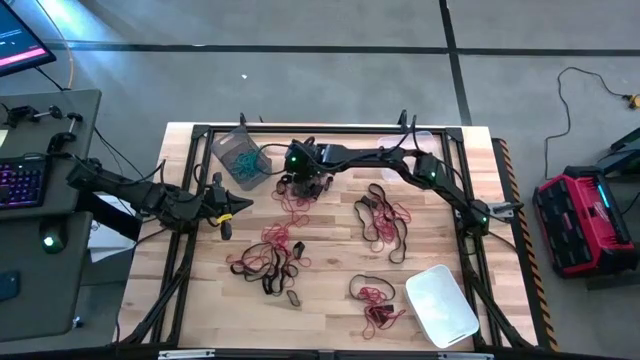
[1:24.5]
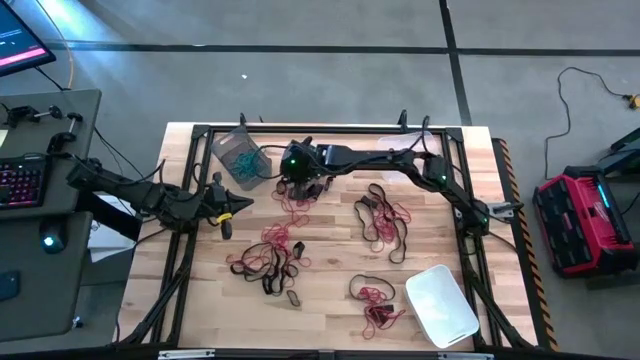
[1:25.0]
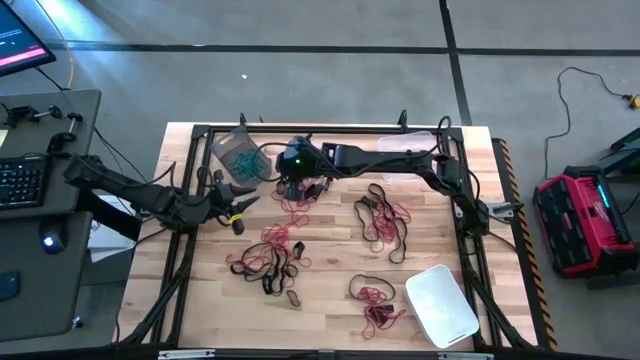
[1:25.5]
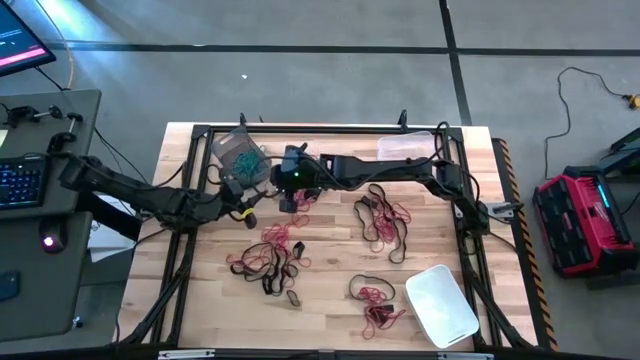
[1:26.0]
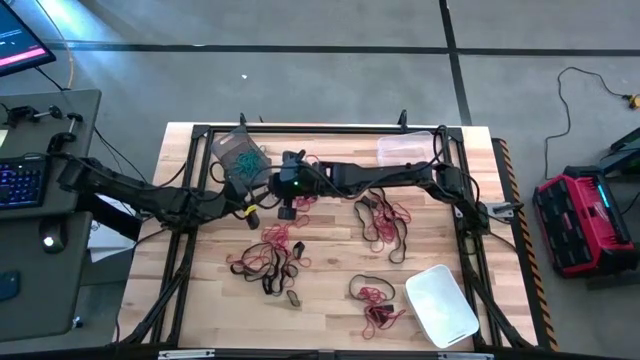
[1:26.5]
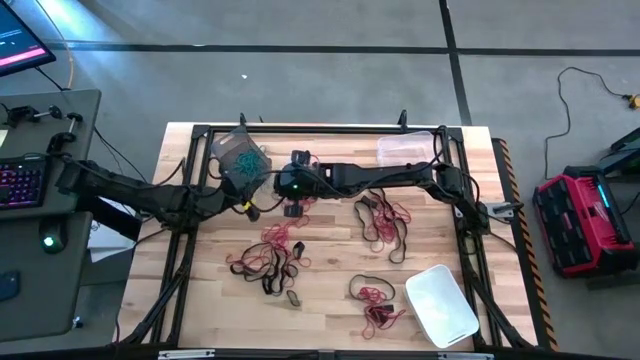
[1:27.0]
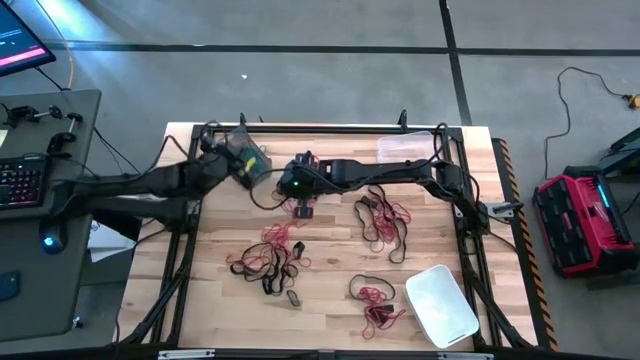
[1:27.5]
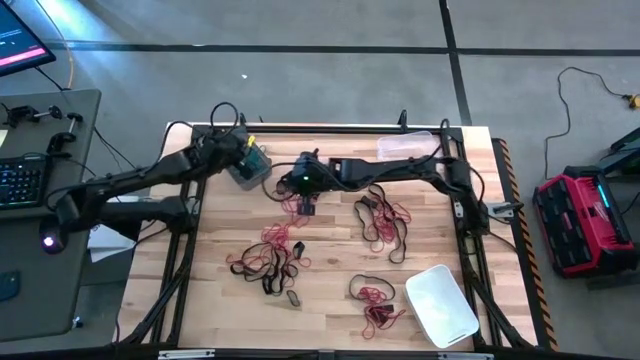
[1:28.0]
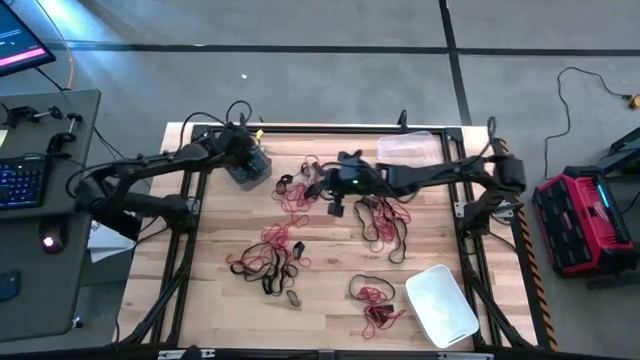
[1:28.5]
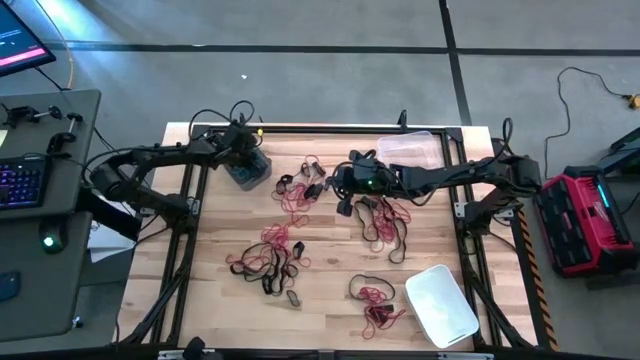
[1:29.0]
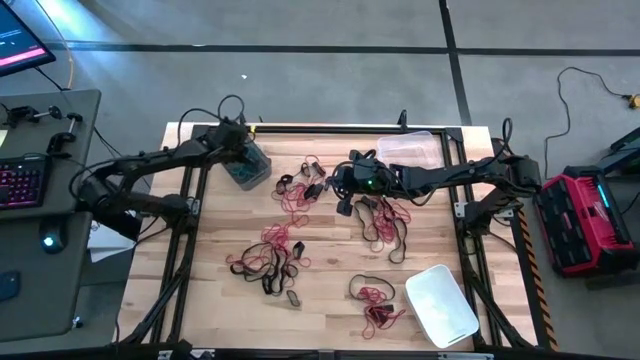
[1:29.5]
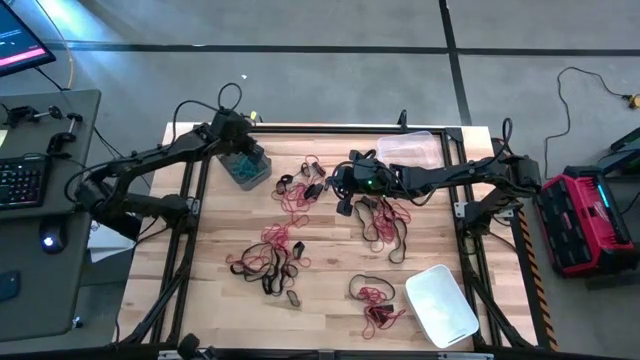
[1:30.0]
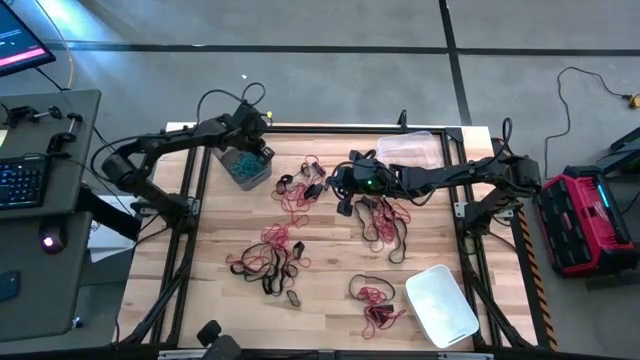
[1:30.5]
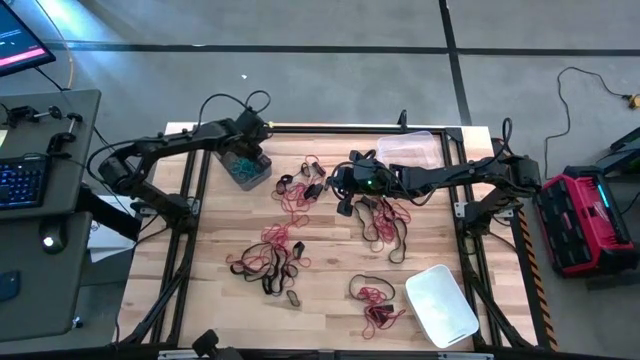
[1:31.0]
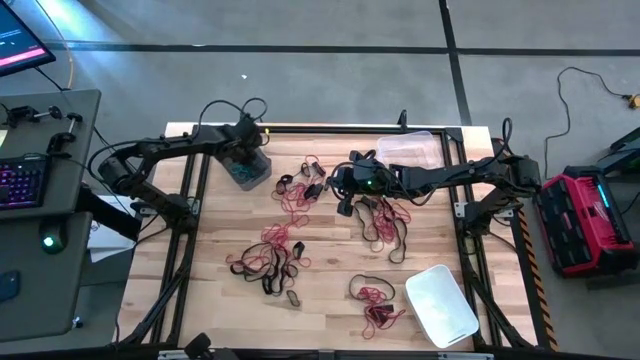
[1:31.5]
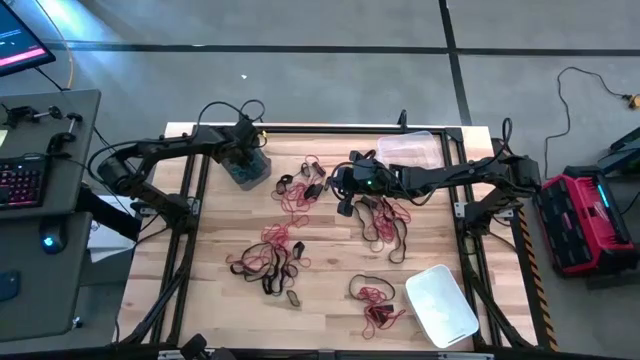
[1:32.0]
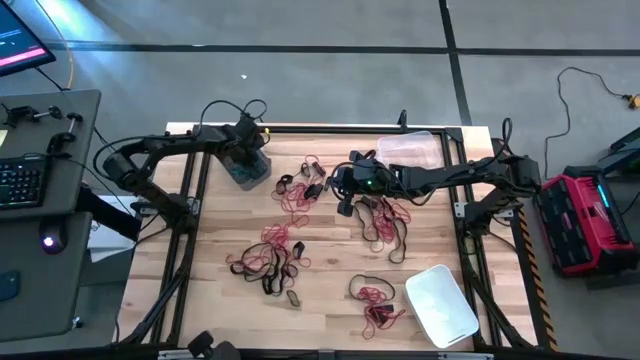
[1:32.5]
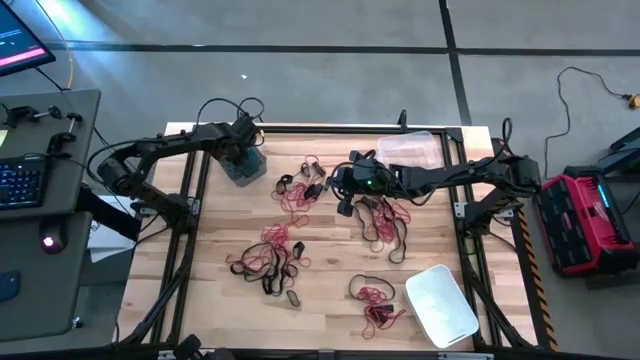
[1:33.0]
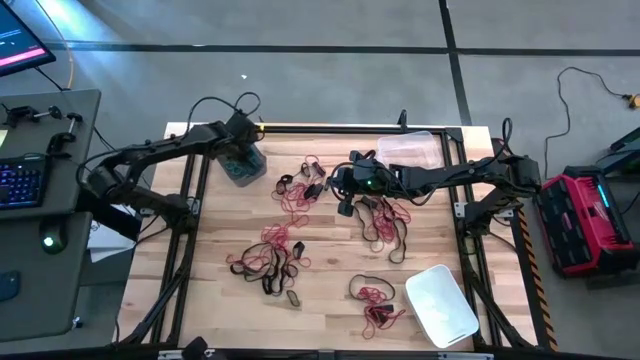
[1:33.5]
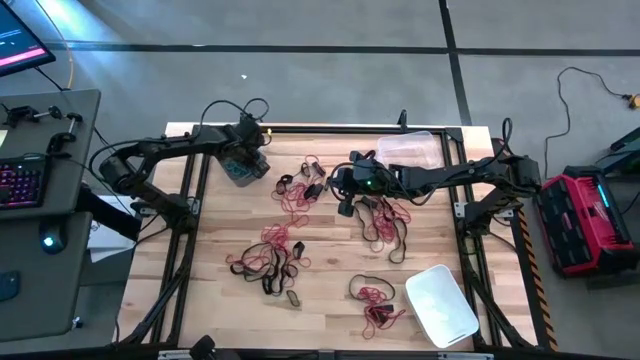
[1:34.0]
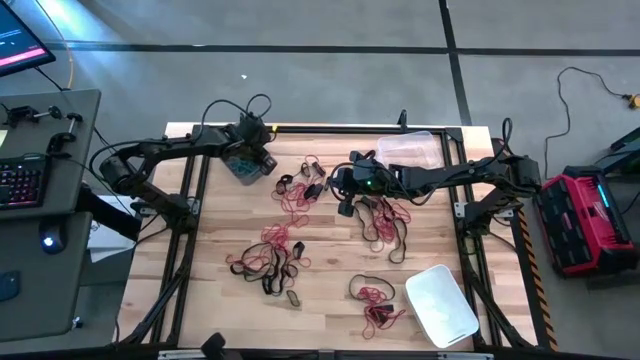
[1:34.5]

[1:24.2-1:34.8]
Task: Sort rubber bands into baskets
Put the blue rubber band into the black bin

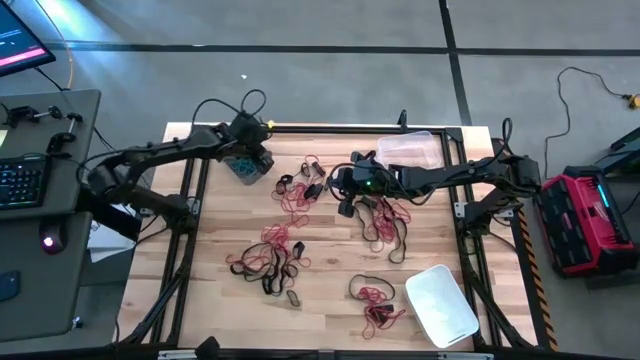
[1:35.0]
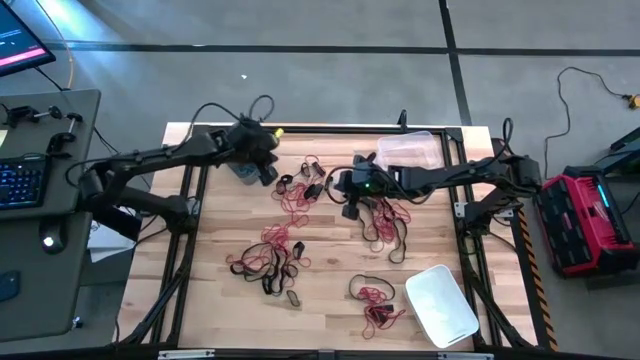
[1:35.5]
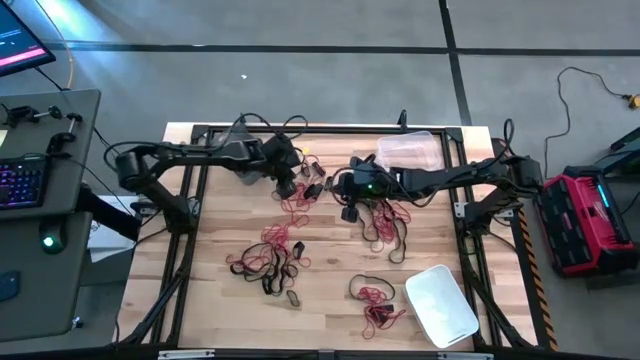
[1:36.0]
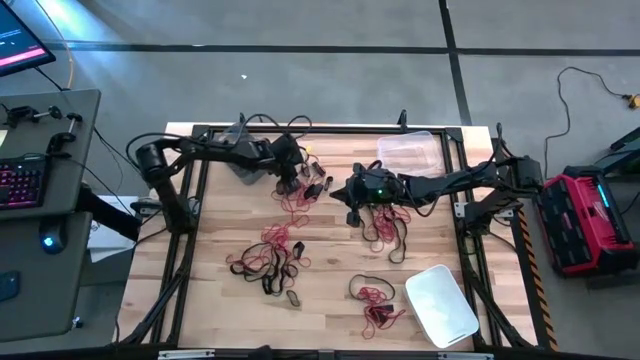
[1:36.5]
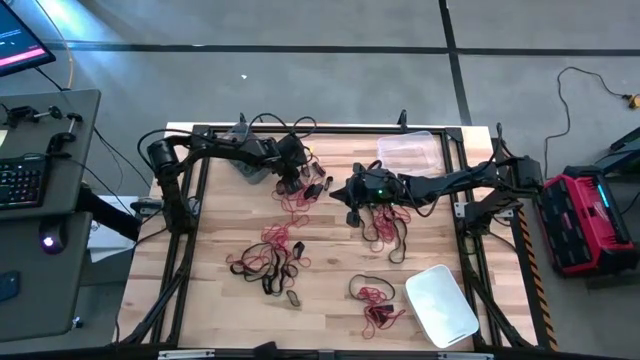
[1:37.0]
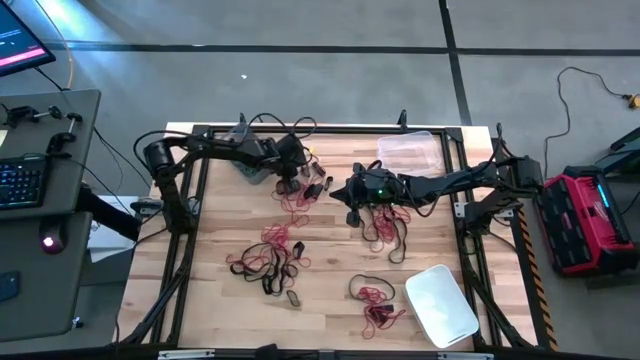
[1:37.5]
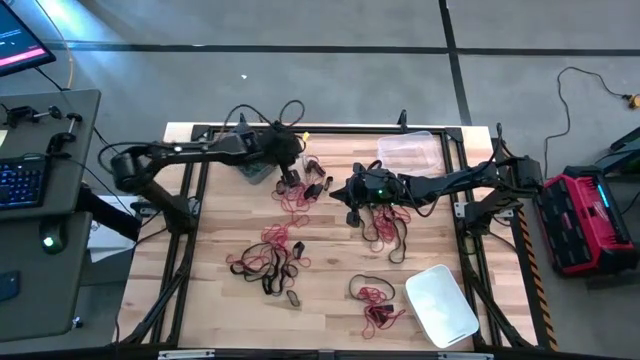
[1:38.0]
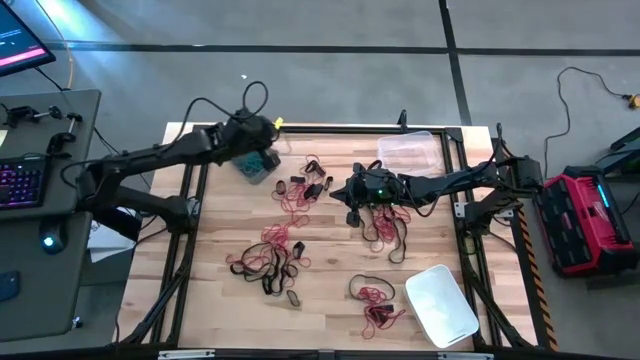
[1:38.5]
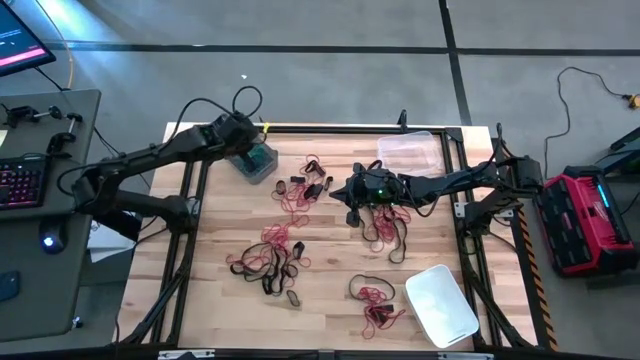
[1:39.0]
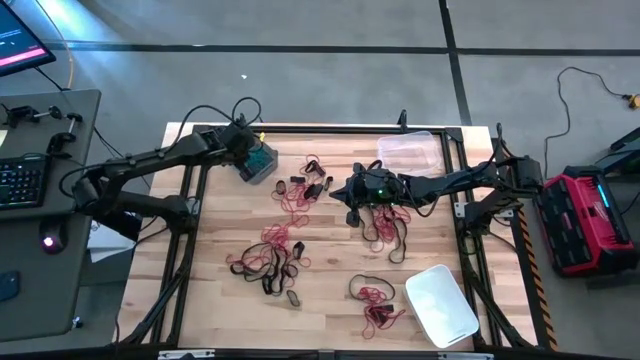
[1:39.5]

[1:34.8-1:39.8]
Put the blue rubber band into the black bin

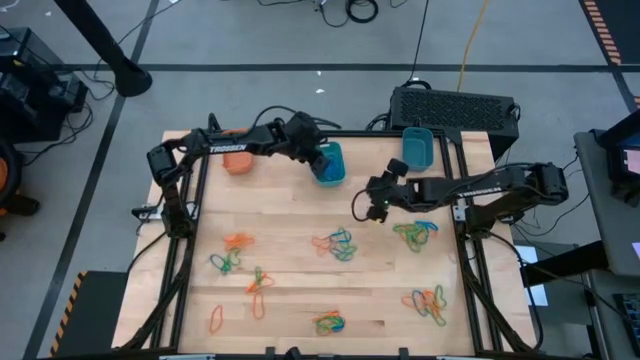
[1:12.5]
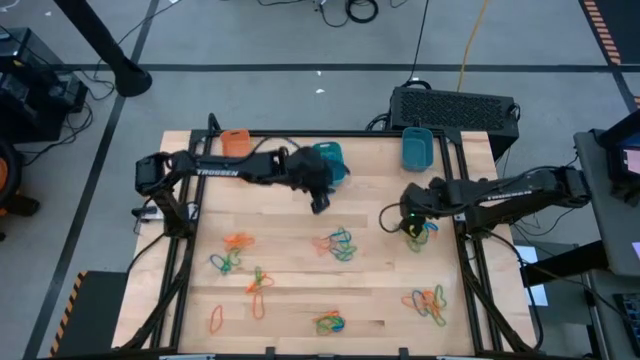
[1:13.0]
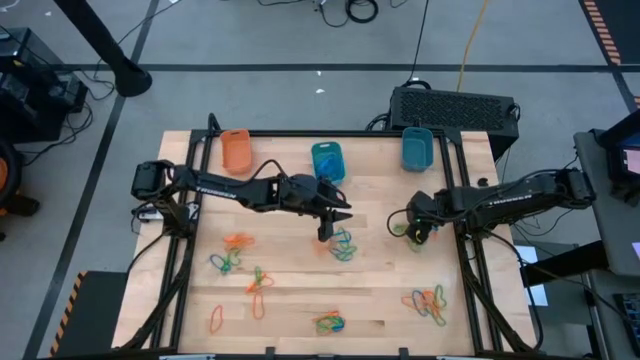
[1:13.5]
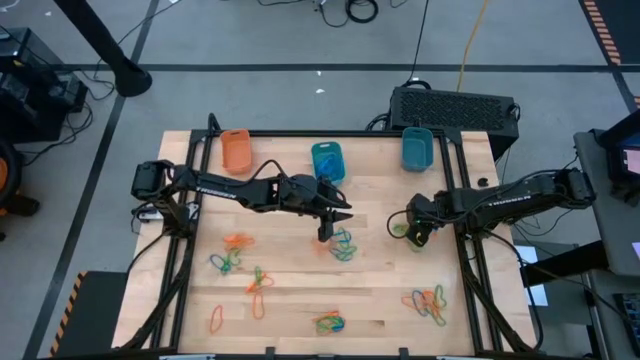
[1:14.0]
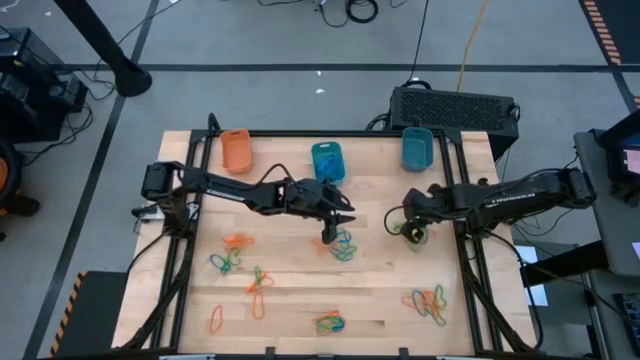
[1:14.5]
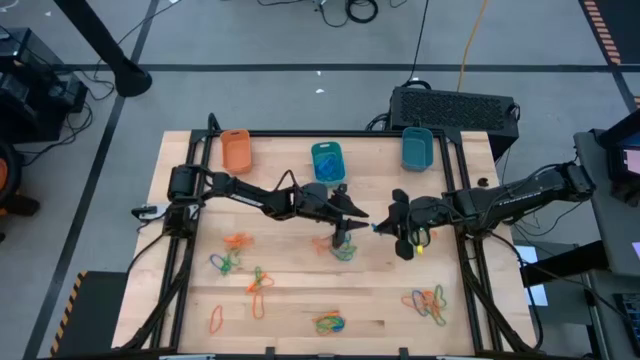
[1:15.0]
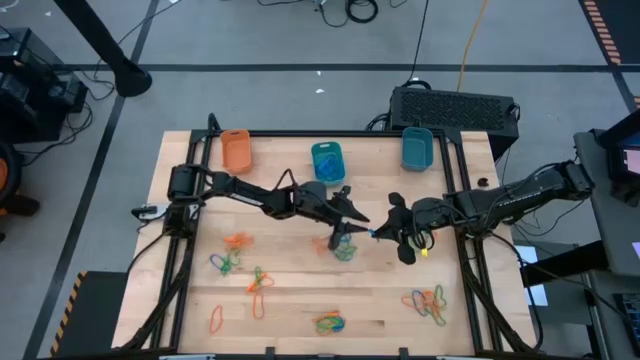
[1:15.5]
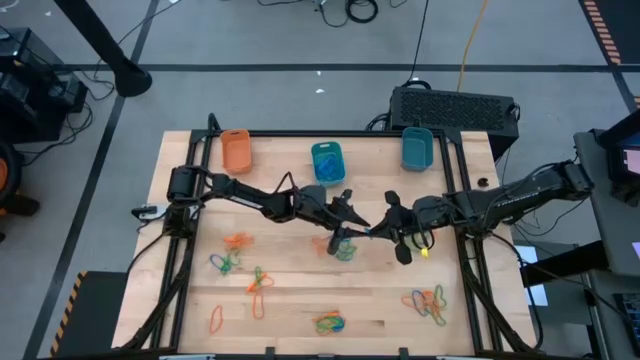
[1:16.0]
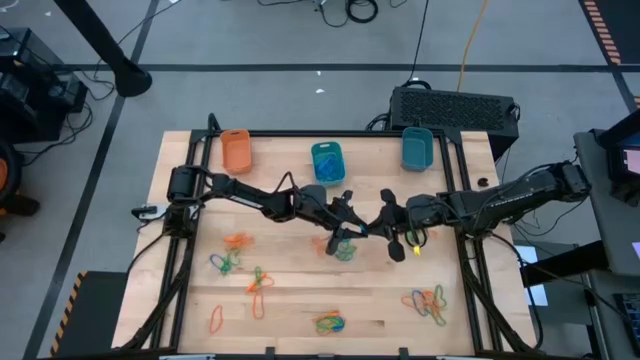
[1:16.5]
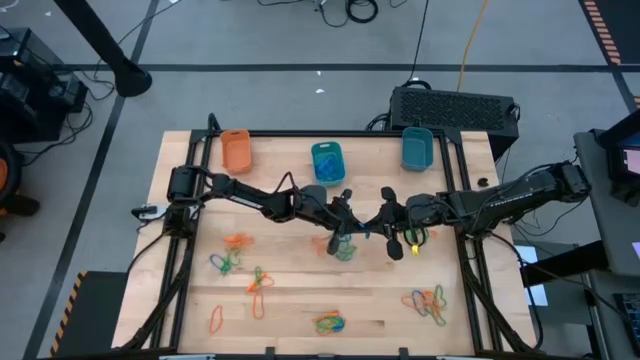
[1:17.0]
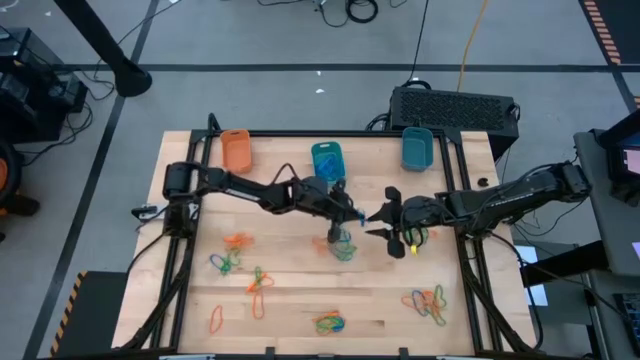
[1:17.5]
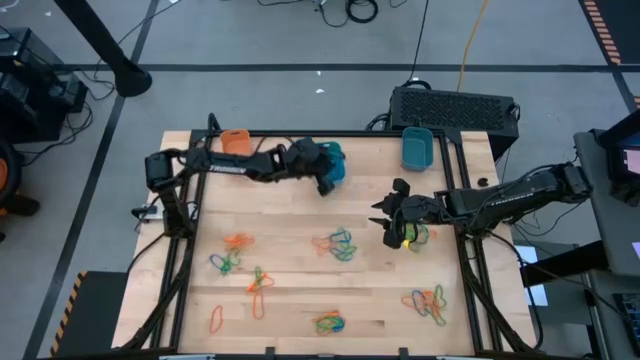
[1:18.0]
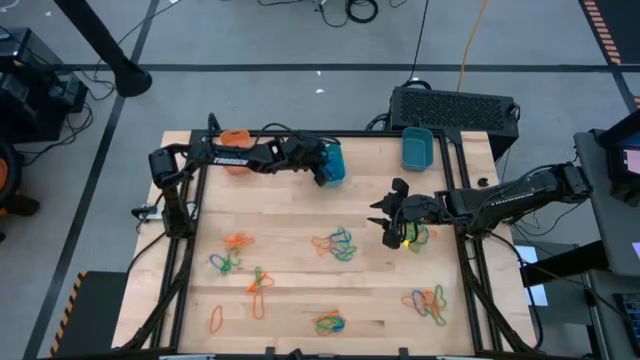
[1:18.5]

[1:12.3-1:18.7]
Task: Sort rubber bands into baskets
Put the blue rubber band into the light blue bin
